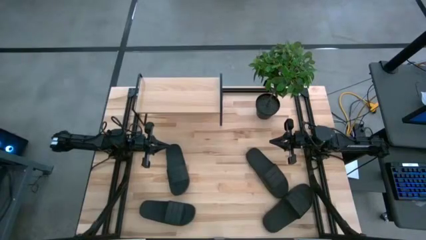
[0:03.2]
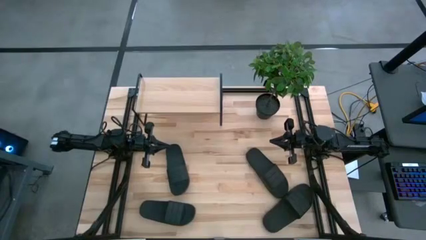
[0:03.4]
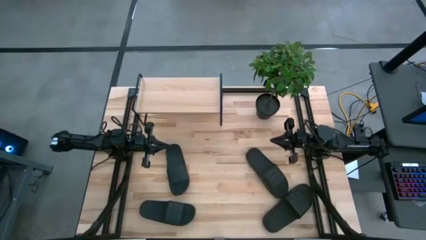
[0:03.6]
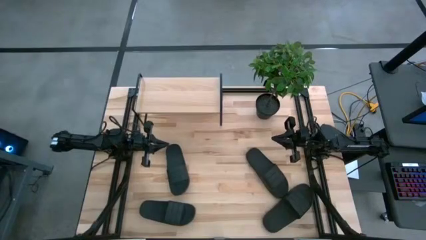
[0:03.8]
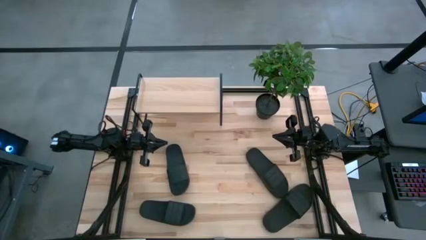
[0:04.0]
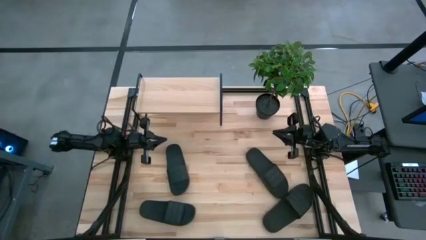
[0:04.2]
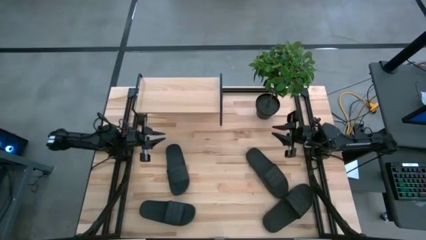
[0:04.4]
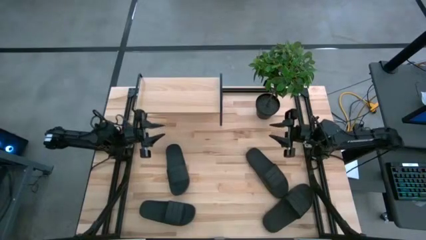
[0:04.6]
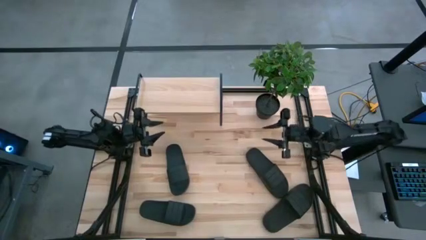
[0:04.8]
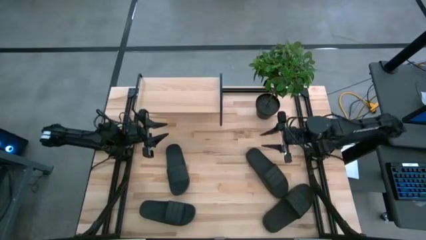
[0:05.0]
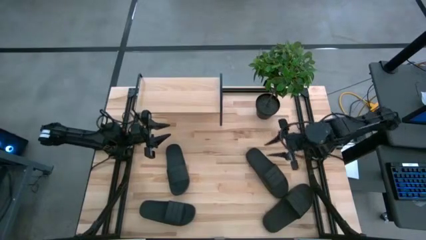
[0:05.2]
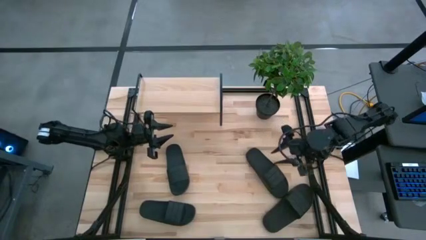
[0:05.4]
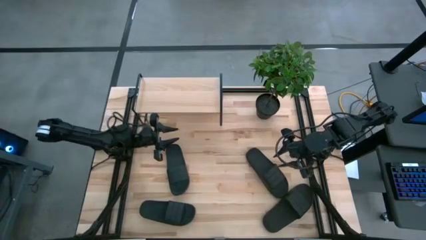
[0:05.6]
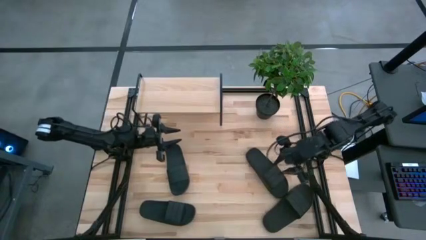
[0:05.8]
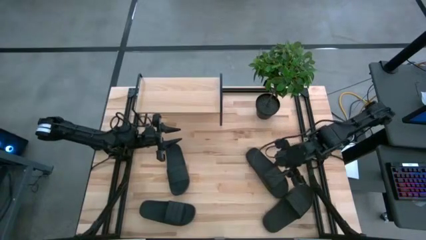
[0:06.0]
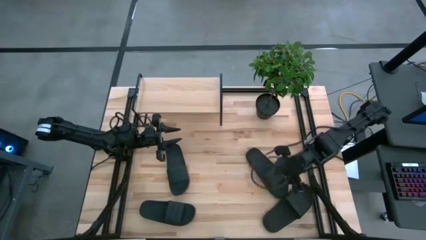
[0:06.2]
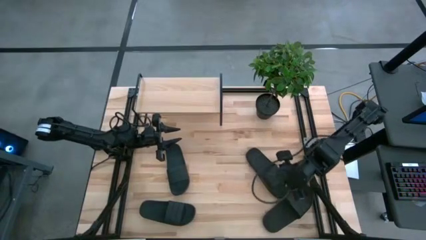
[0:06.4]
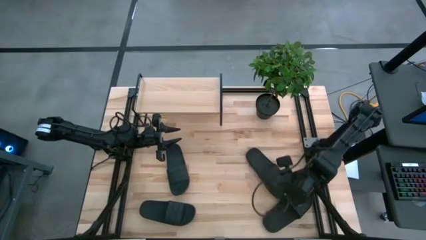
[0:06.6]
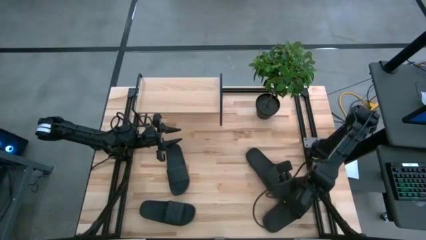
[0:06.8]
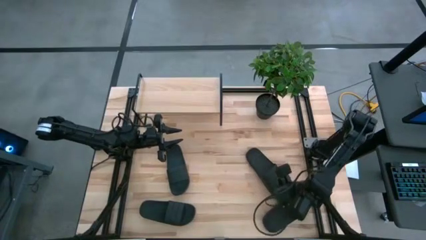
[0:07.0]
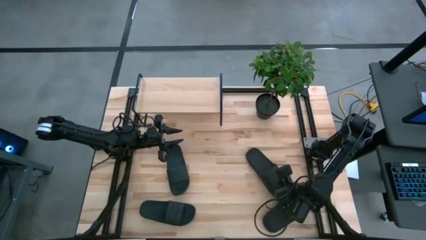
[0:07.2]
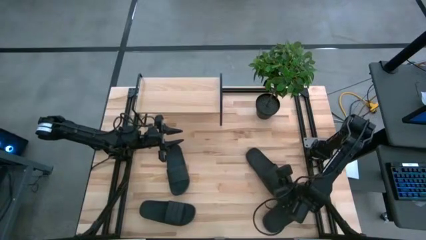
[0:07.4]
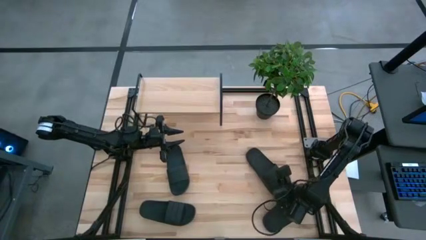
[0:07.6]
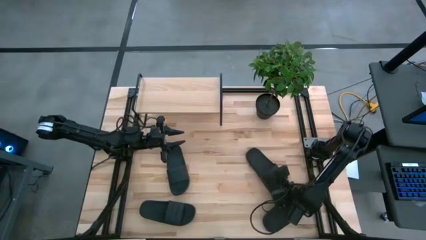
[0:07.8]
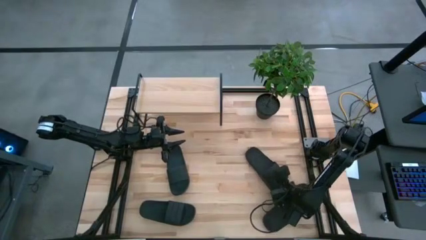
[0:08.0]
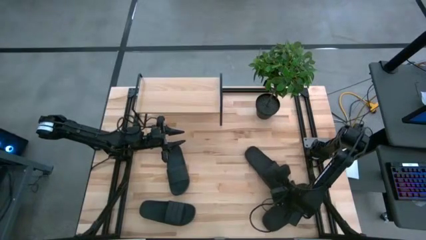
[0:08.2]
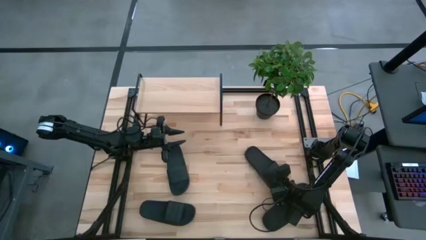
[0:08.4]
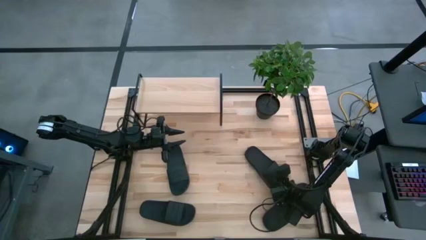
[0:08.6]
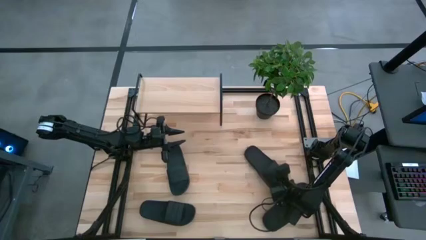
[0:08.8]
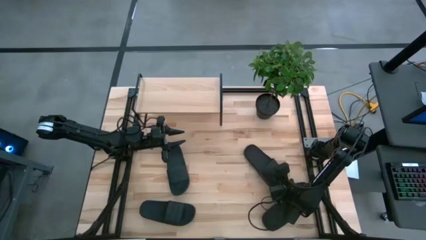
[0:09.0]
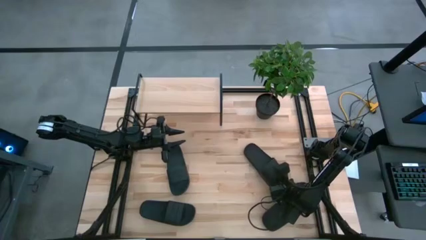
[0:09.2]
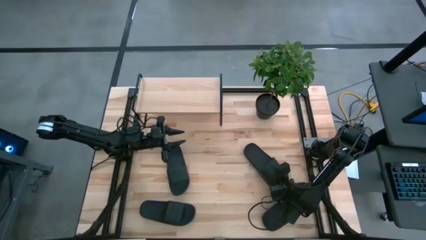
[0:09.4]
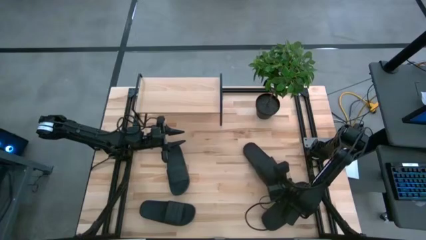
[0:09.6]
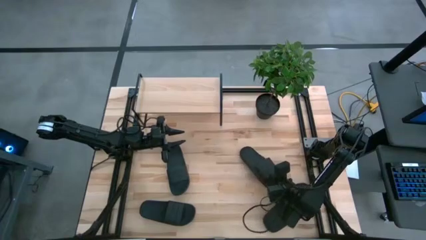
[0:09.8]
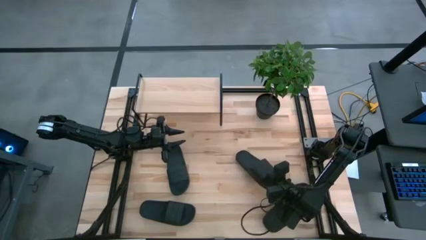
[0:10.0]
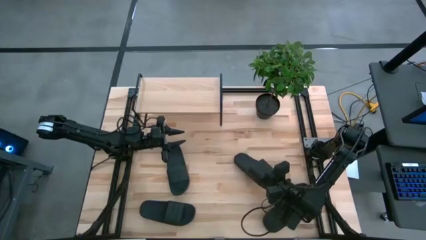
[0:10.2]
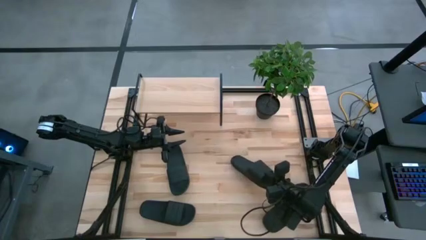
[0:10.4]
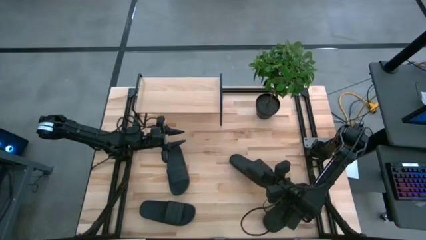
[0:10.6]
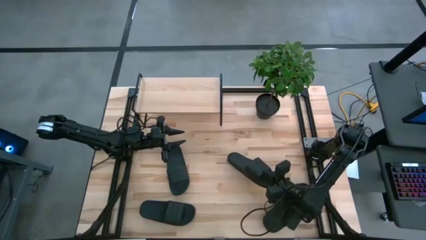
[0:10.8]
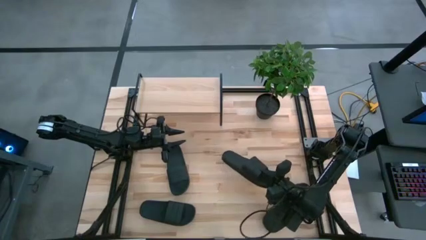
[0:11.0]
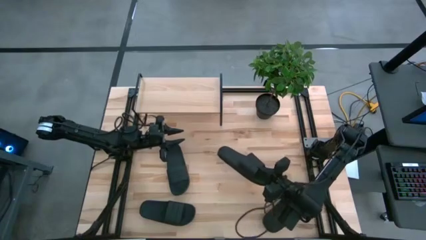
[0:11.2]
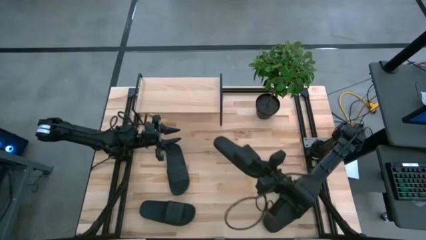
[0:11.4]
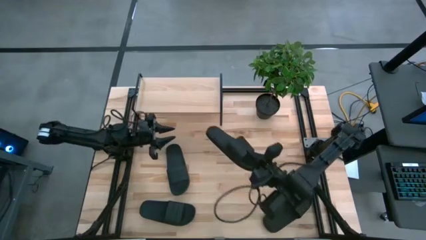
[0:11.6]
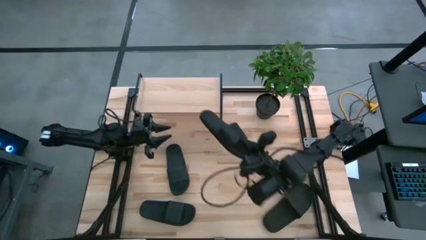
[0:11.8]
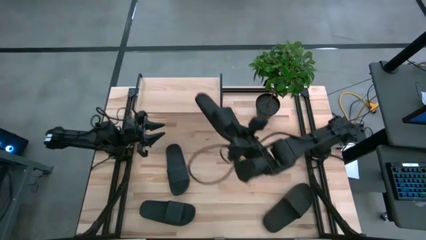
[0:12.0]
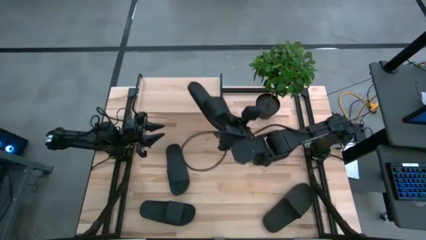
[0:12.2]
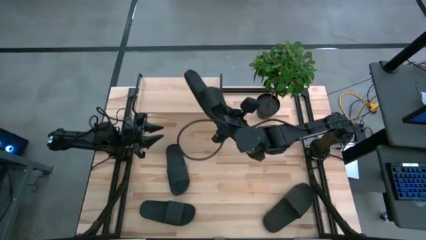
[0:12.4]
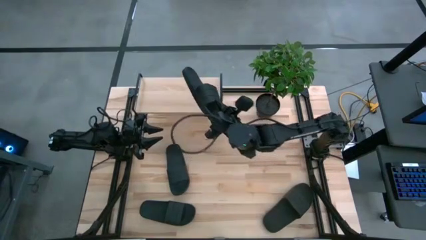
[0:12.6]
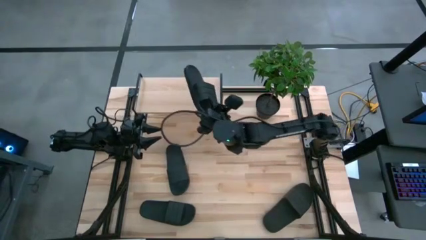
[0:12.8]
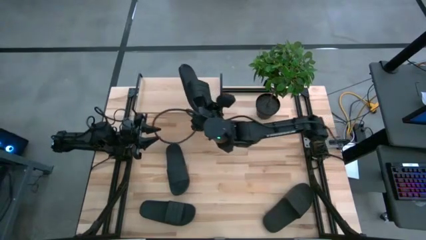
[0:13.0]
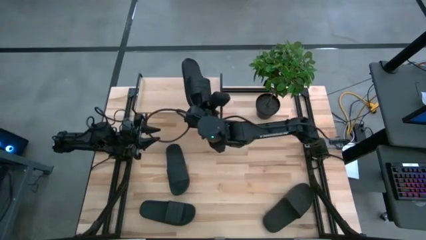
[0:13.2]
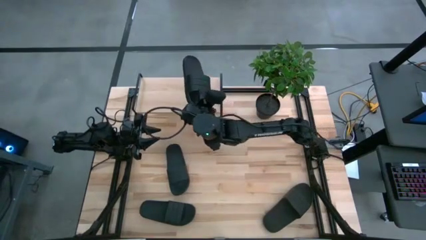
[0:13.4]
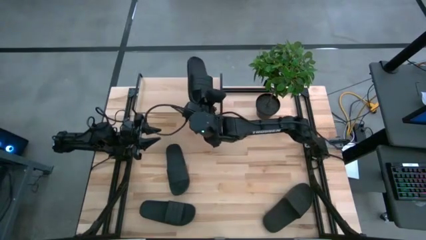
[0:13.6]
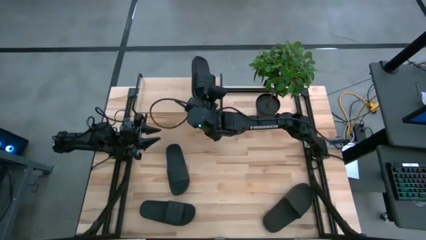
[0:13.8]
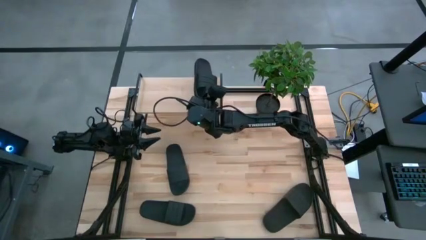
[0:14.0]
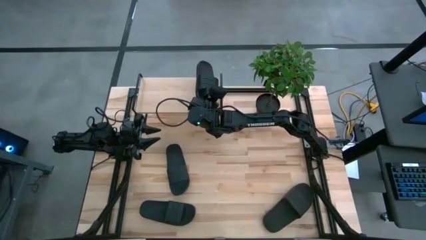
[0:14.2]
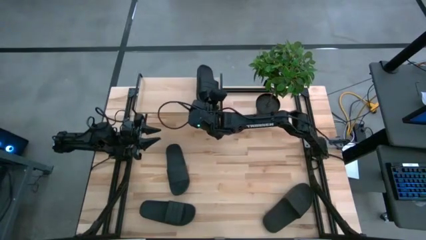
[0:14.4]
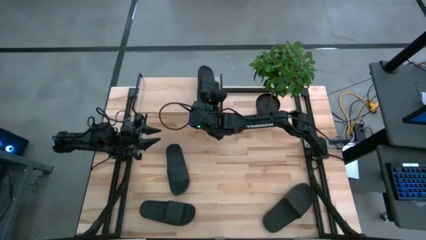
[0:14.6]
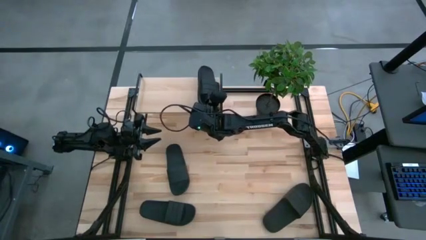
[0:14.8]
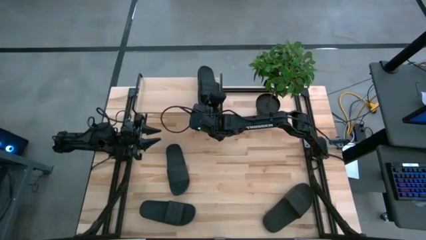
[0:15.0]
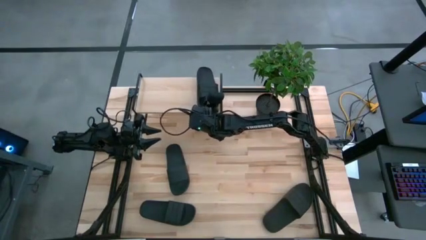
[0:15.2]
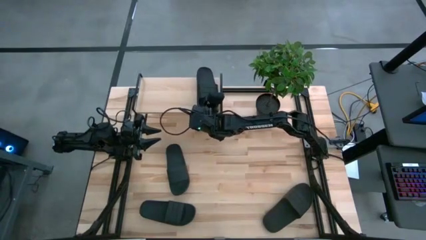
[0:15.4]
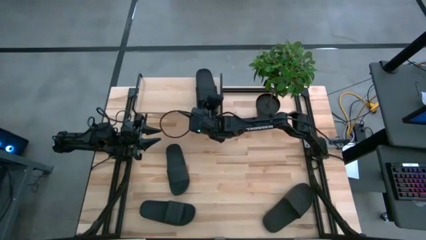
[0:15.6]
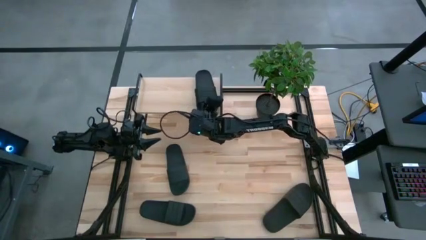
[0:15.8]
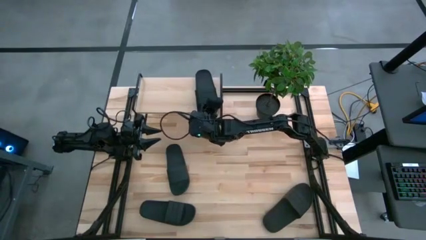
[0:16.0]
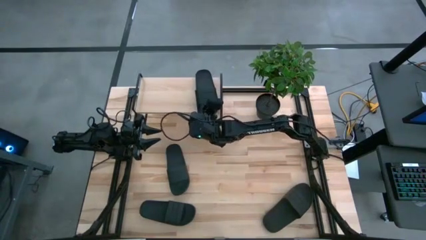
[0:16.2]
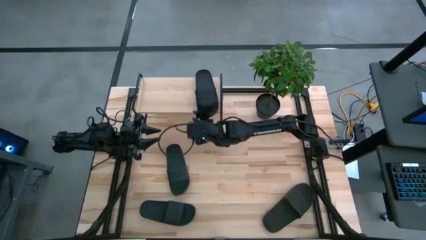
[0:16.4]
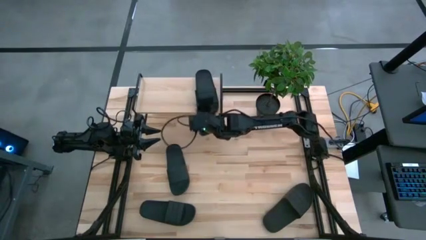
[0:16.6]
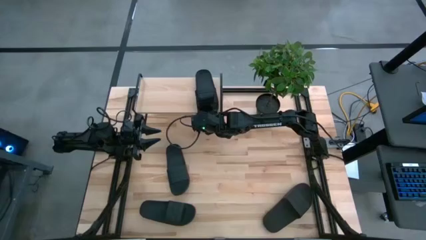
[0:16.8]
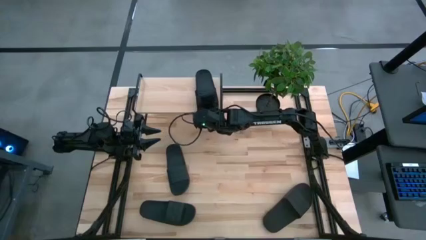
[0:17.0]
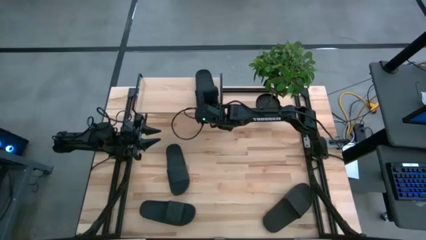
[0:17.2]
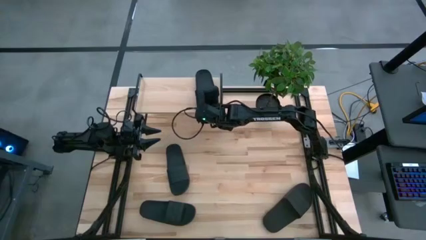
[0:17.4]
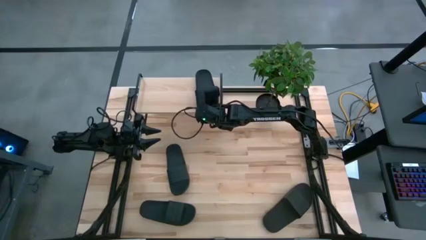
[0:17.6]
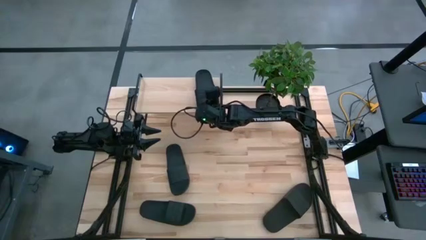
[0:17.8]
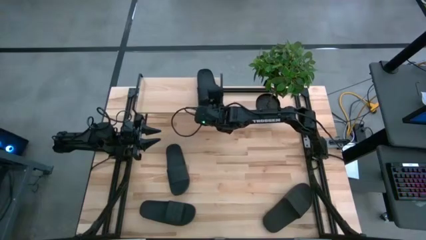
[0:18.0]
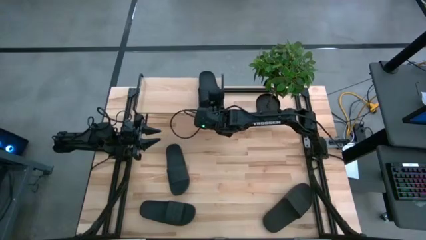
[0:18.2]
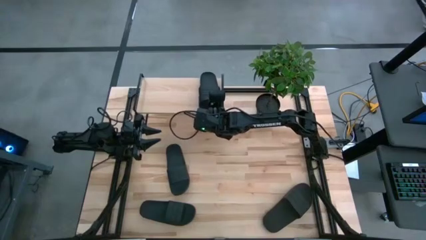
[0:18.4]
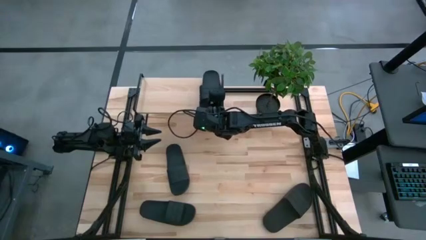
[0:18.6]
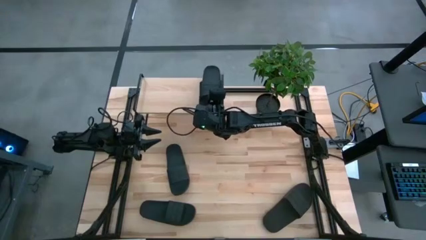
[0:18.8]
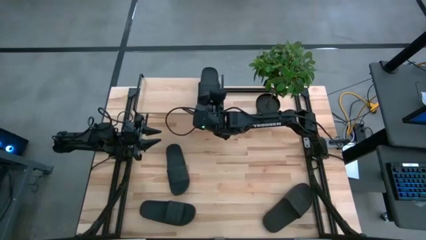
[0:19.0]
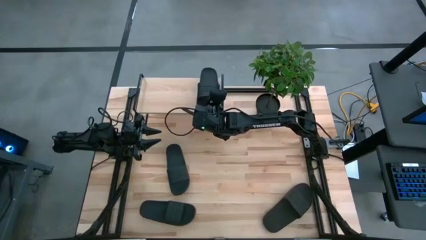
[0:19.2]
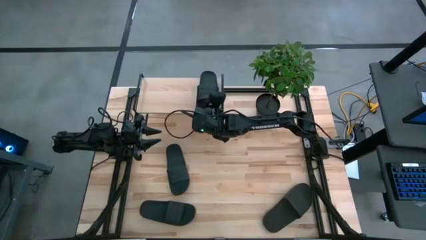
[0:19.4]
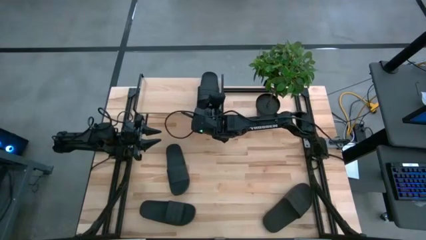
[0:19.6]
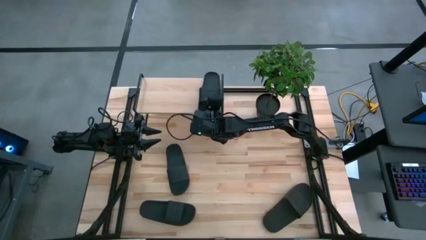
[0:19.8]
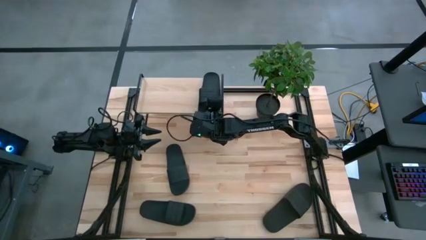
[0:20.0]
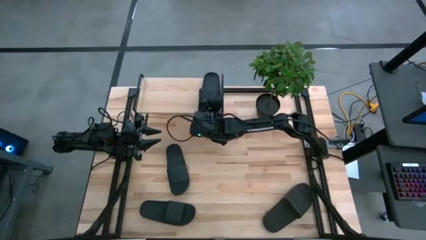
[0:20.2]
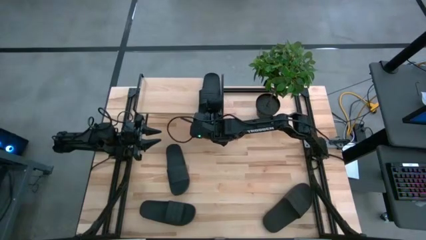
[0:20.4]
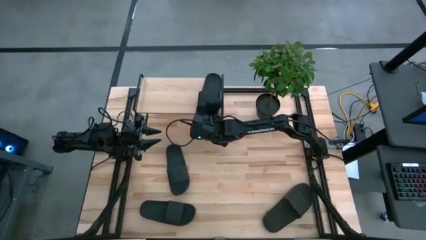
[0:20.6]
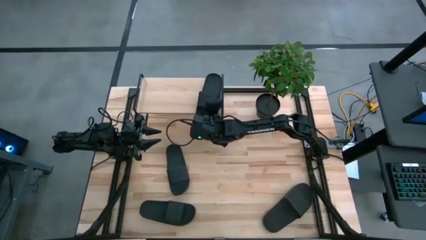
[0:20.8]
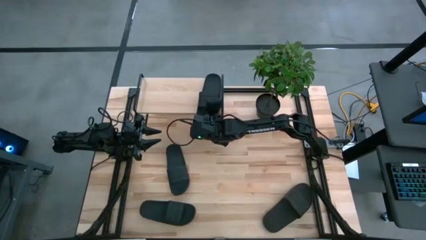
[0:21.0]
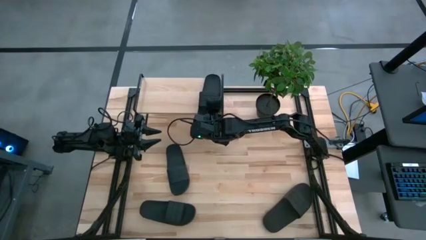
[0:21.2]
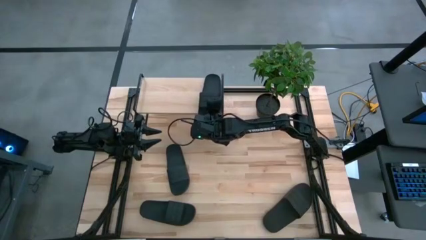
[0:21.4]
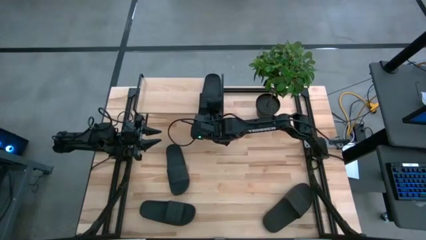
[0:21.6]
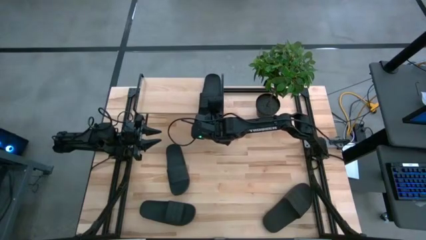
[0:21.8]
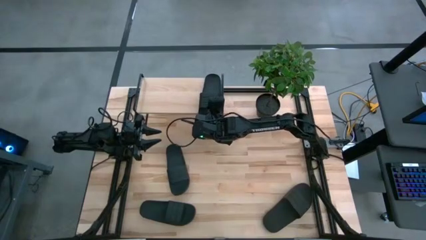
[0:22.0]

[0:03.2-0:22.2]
Task: Pick and place slides into the shelf
Put the top right black slipper on the shelf
